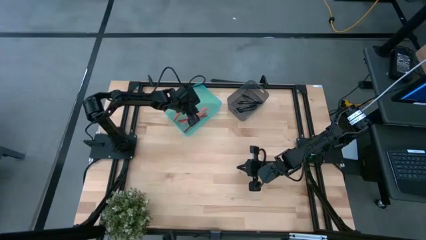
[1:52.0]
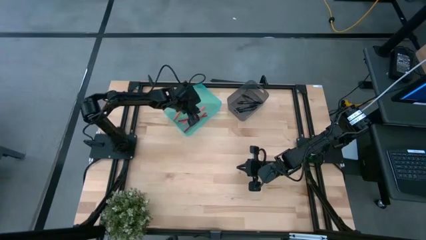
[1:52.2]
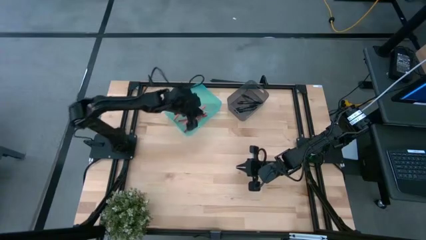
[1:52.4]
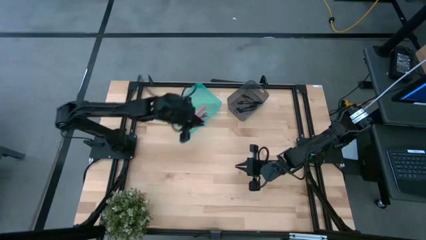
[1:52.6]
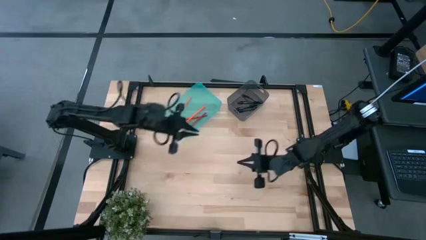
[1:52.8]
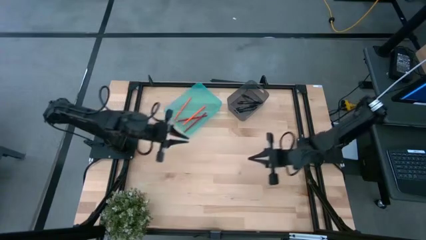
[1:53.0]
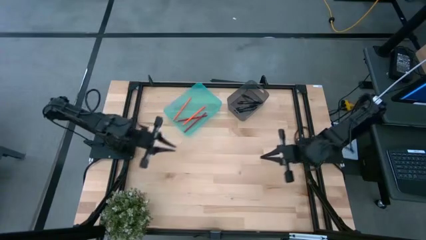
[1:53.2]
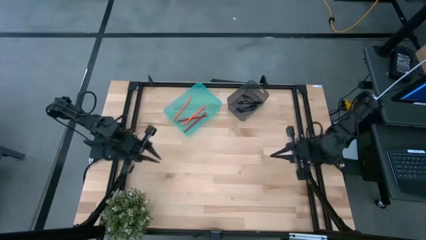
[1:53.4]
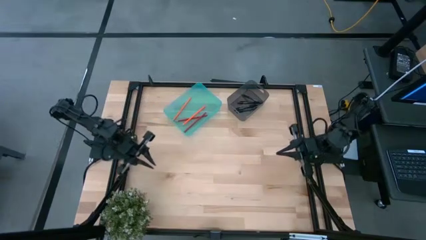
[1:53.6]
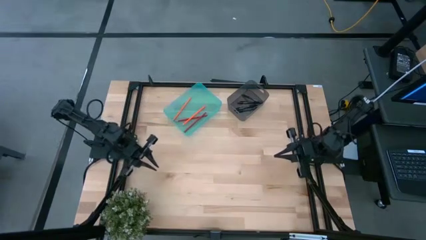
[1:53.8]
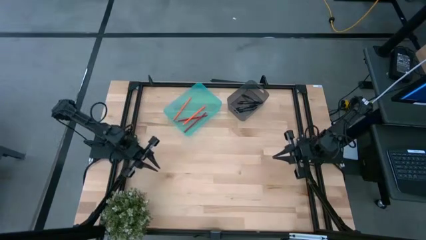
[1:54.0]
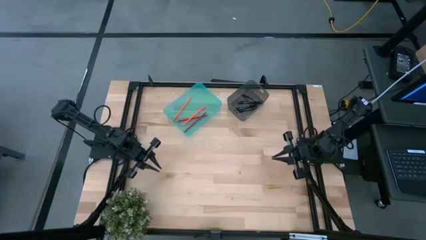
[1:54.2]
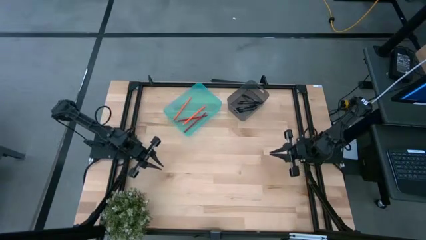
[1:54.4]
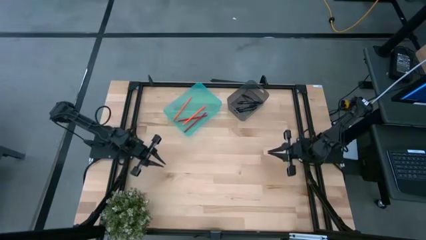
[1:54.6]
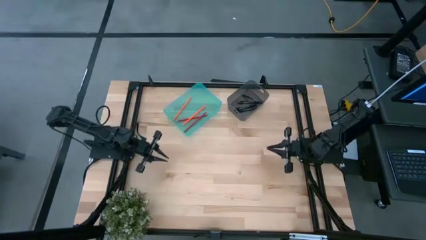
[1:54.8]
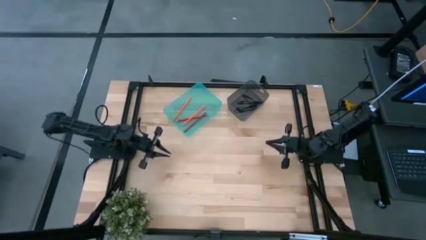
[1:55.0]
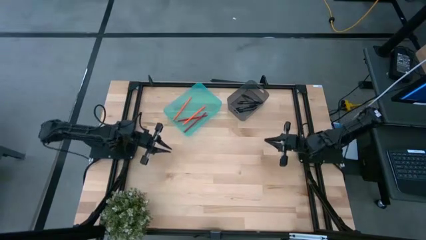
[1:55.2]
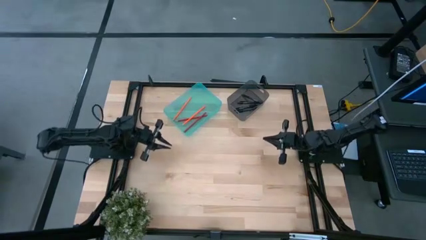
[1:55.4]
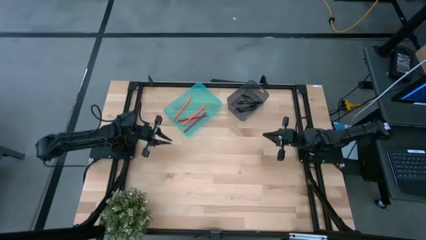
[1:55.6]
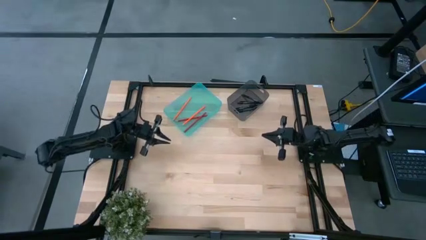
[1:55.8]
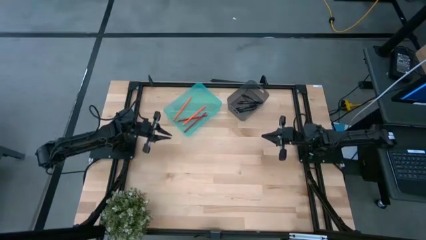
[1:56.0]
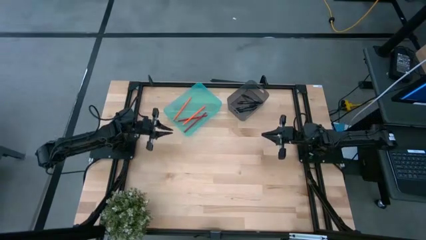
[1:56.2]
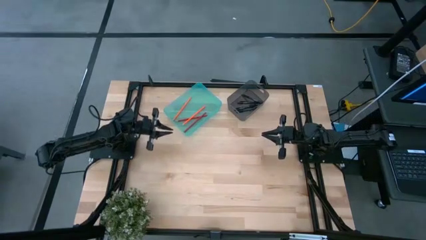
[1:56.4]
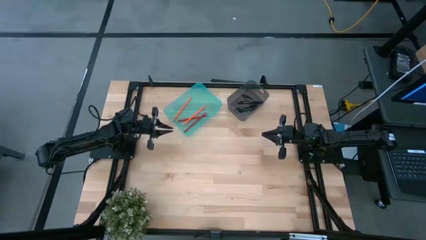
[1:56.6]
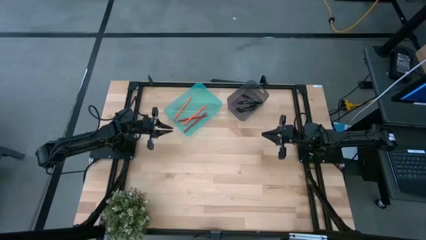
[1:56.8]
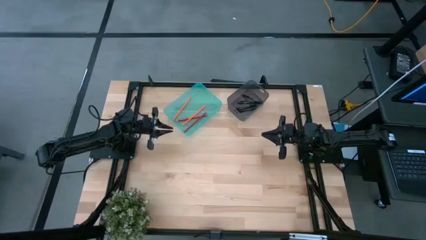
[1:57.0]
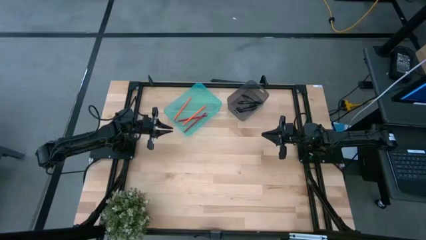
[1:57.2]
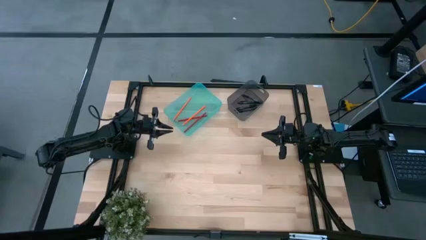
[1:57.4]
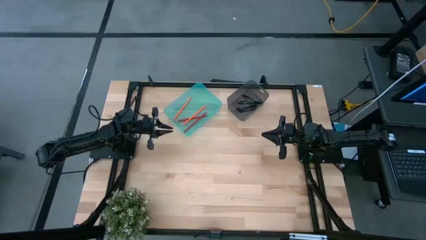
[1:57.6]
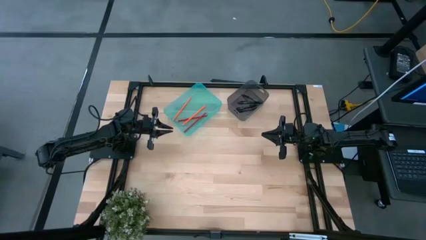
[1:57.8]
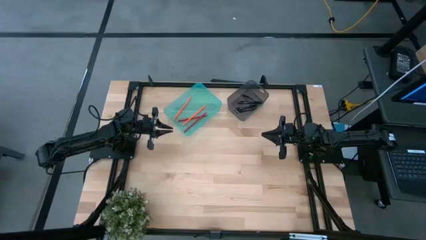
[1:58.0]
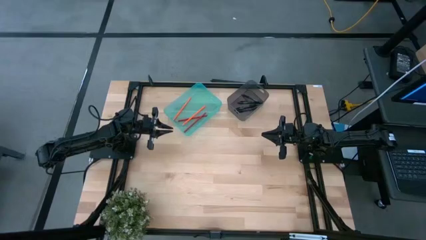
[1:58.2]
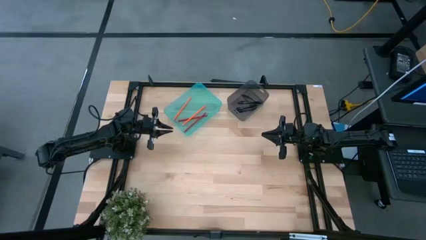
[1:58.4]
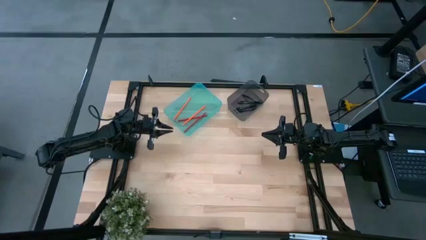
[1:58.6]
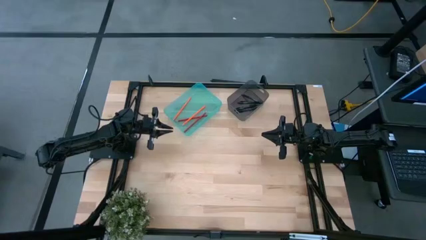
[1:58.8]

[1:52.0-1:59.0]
Task: Sort pens & pencils
Return to Home Position

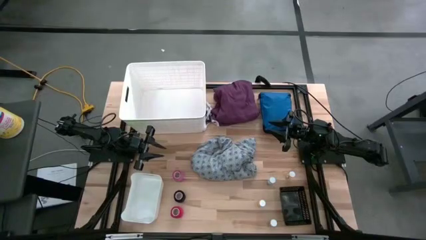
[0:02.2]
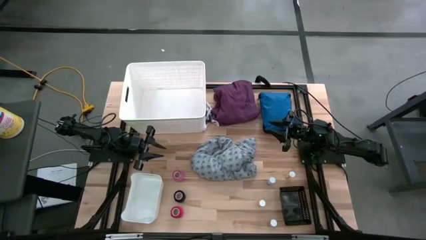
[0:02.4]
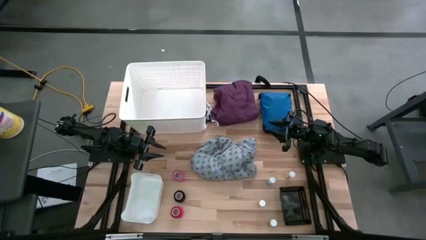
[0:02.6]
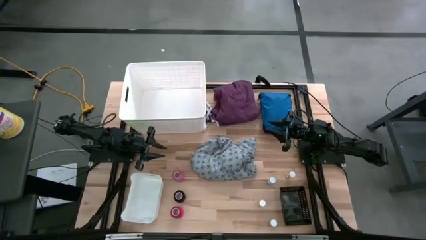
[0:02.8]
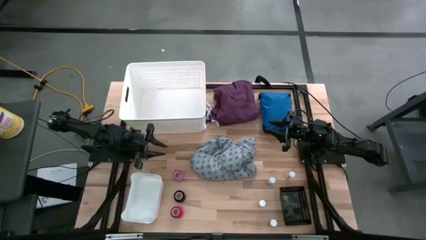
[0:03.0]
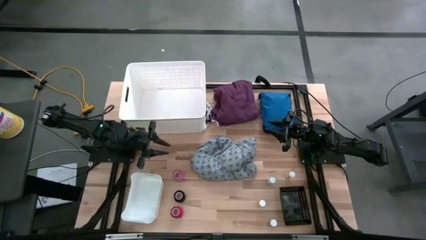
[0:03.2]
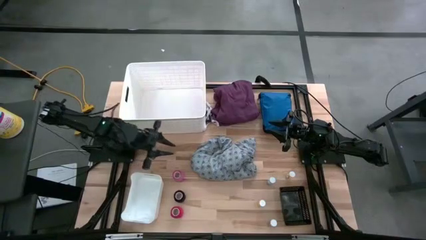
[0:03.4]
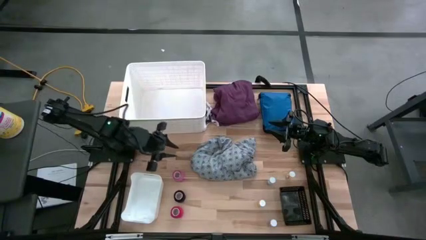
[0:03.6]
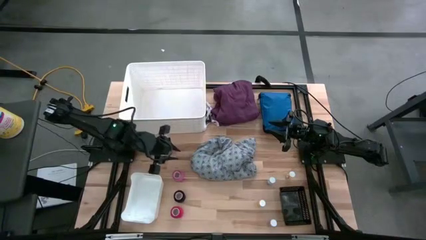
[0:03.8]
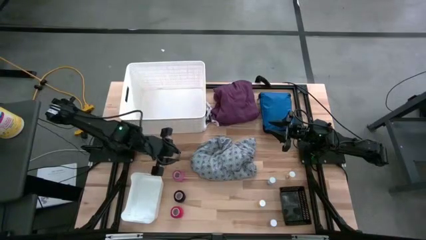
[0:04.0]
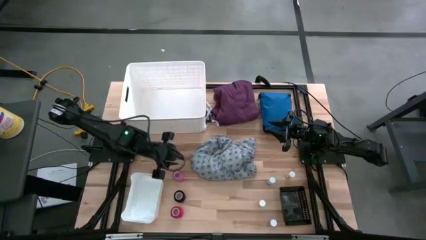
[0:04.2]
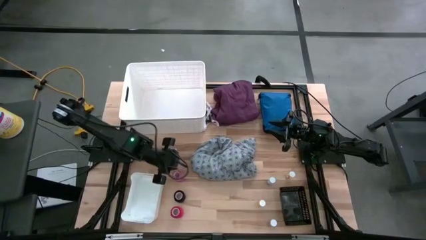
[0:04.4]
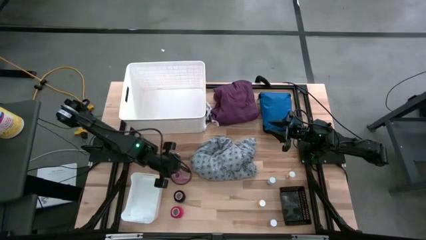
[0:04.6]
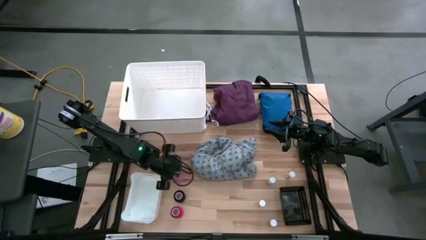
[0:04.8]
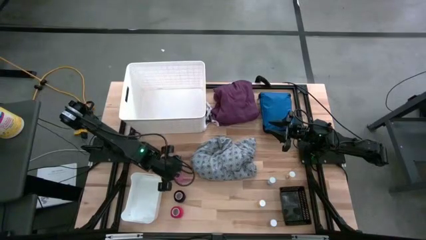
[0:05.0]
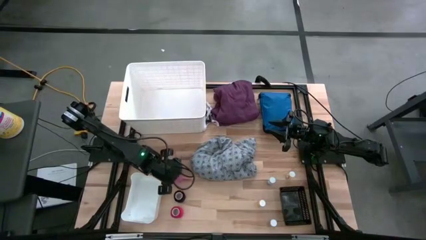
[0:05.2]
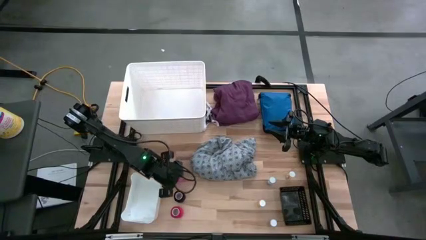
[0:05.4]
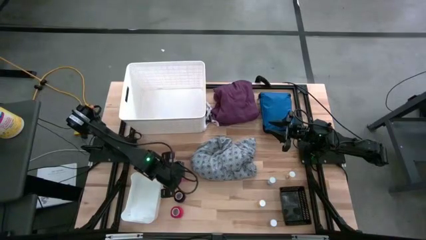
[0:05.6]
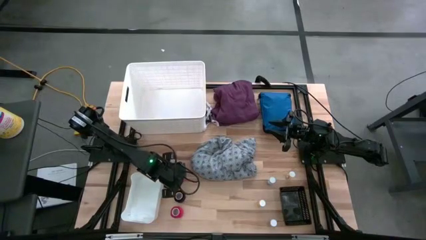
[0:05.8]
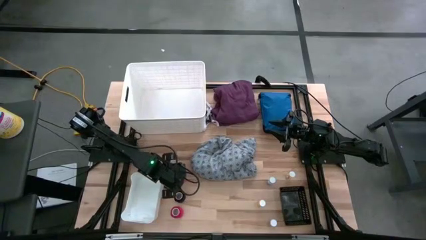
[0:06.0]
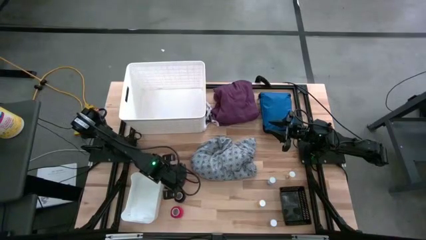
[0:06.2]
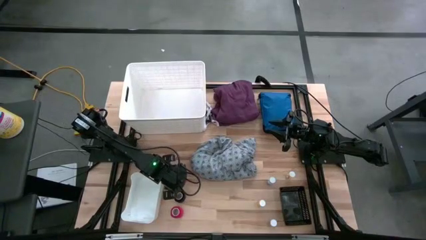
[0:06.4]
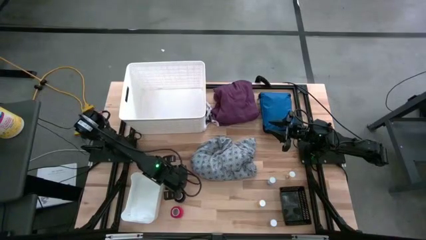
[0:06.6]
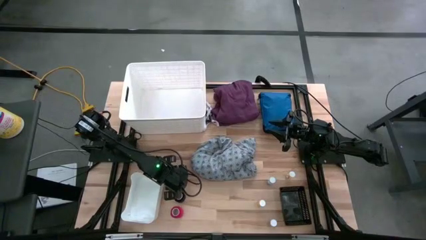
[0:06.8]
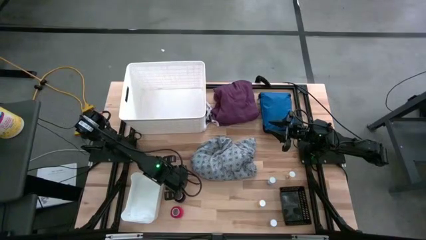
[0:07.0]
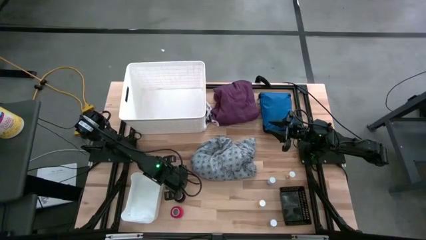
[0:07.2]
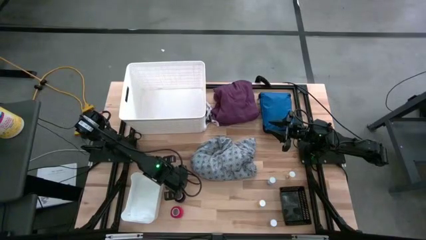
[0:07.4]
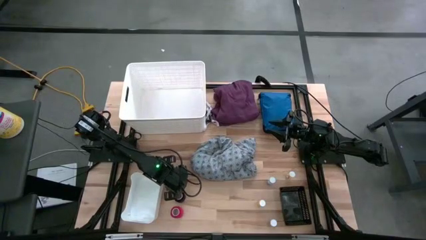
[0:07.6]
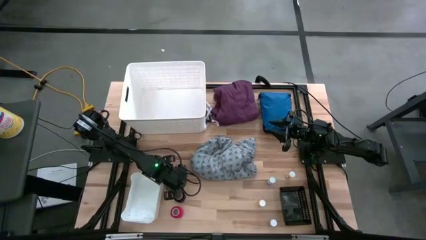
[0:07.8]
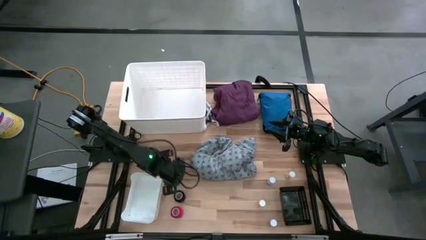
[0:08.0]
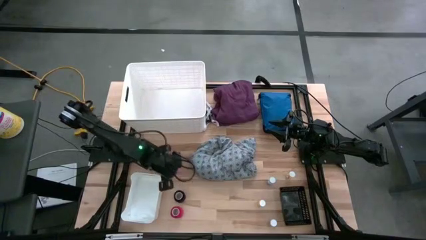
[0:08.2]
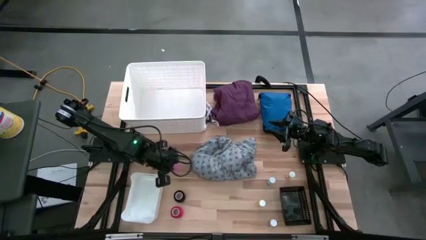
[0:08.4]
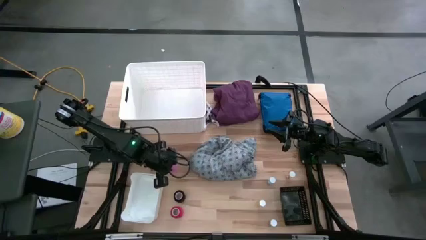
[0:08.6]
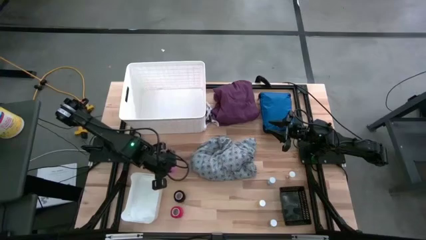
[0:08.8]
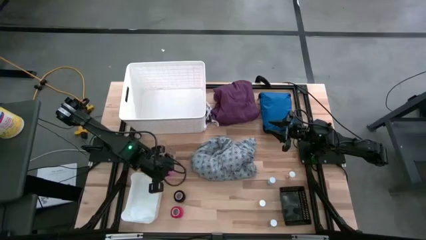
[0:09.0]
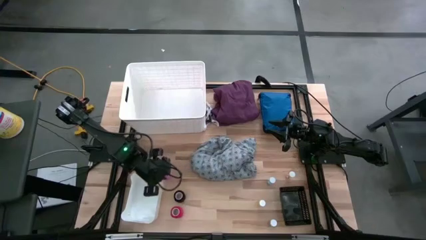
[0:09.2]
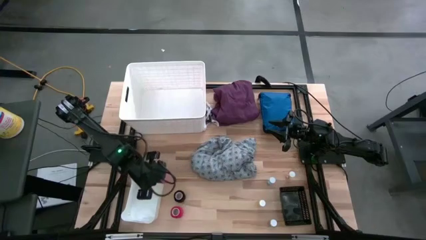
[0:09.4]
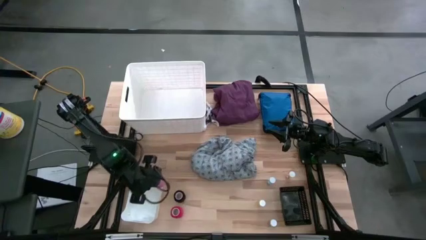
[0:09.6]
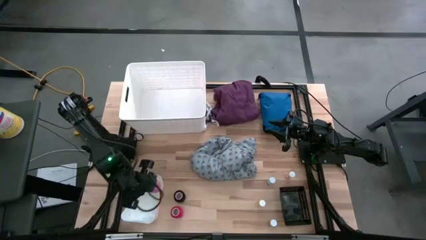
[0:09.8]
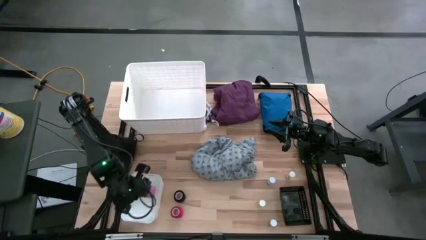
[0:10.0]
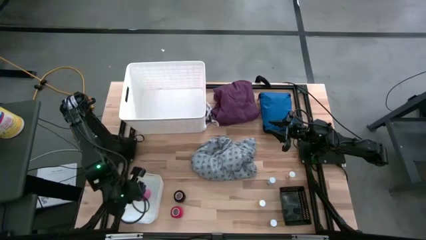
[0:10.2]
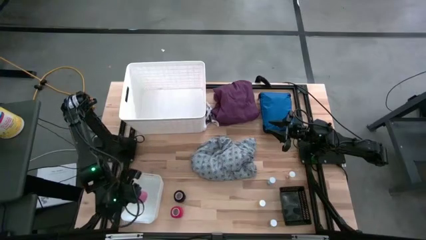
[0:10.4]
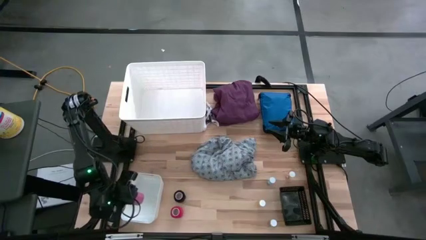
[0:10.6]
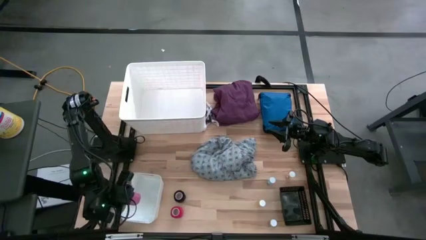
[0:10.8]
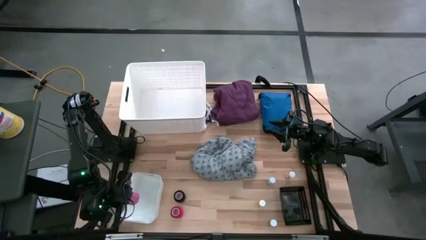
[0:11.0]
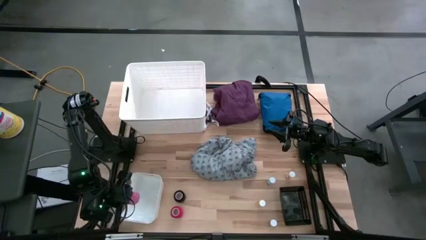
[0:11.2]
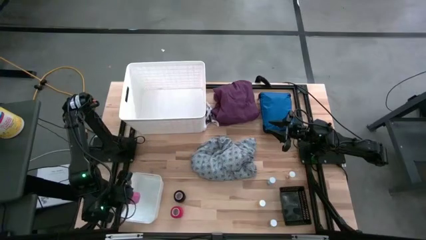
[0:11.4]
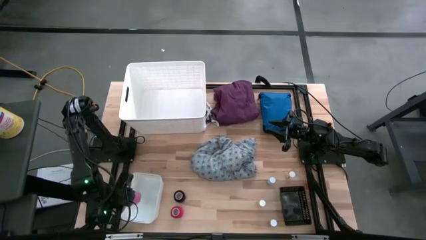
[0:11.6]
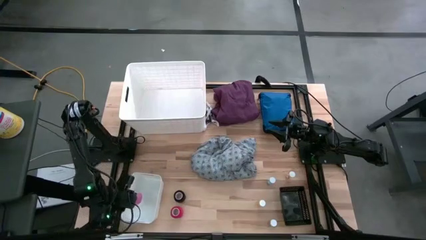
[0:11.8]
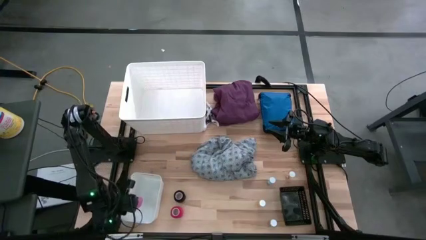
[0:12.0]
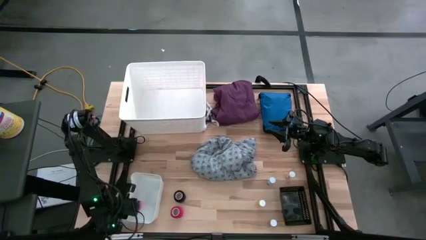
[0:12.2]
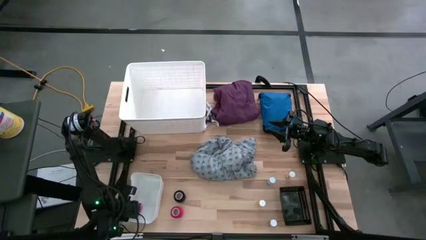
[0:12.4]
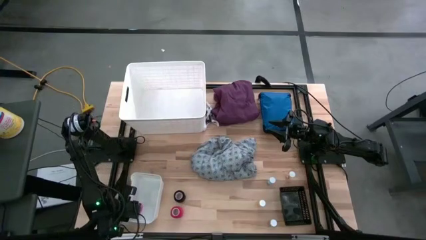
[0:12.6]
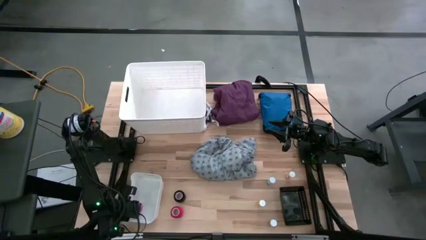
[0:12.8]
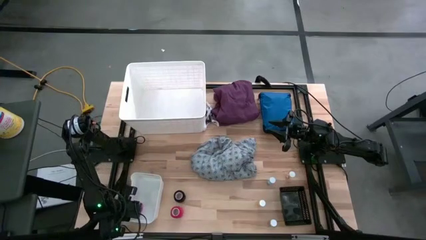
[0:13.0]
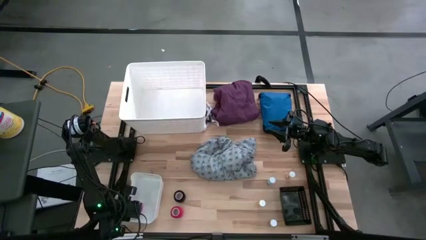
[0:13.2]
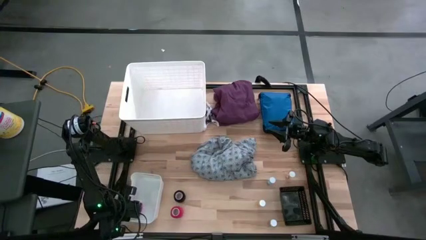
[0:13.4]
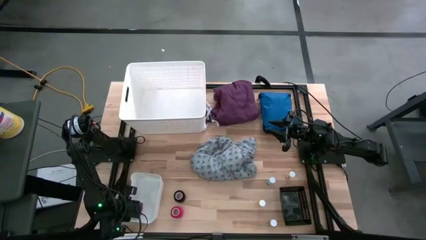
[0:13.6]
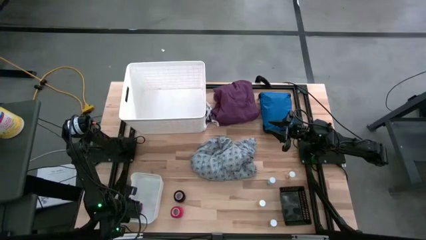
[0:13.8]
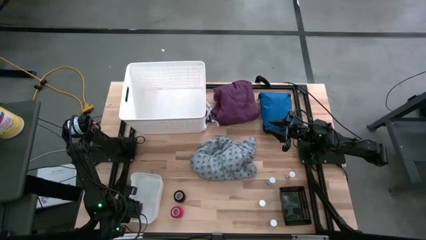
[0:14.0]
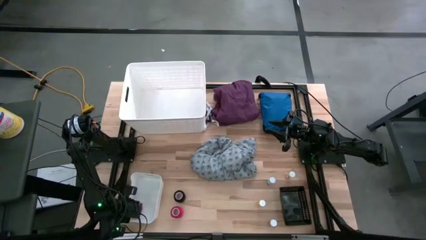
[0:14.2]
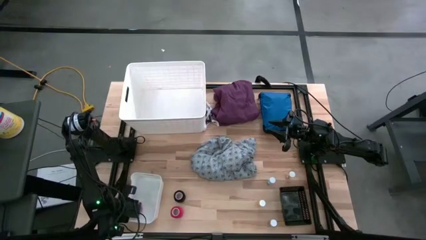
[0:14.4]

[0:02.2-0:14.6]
Task: Pick & place medical supplies in basket/bin
Put the pink bandage into the bottom white bin
